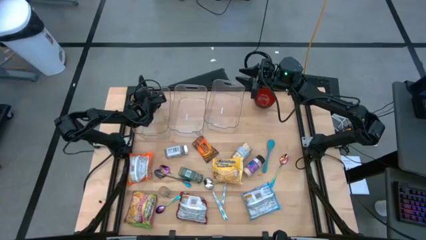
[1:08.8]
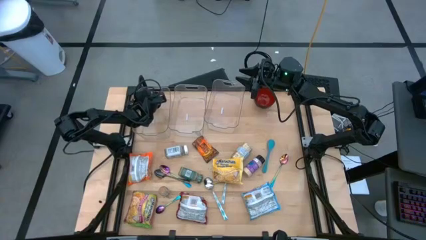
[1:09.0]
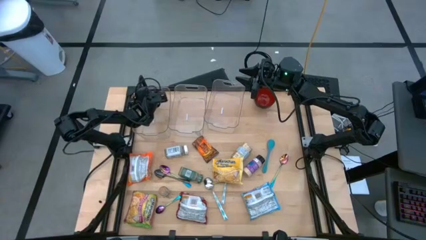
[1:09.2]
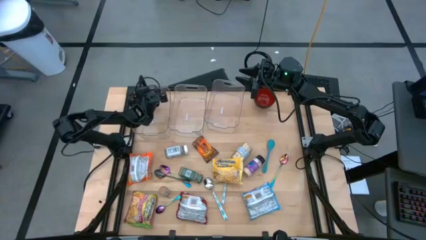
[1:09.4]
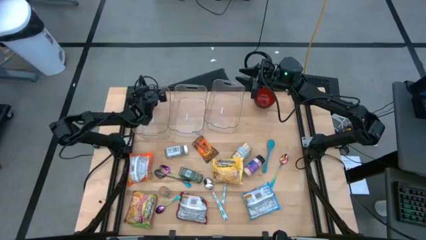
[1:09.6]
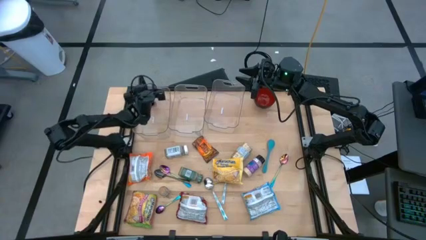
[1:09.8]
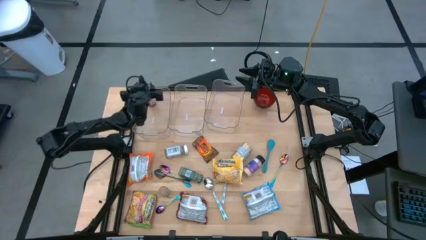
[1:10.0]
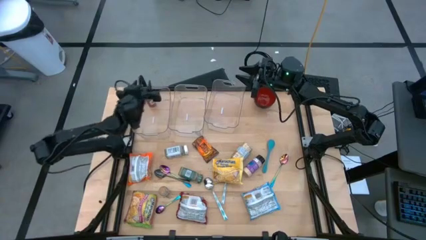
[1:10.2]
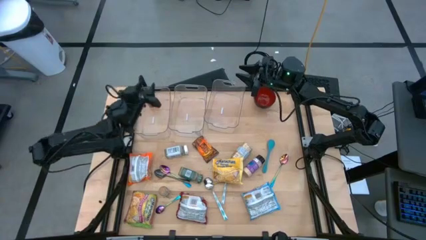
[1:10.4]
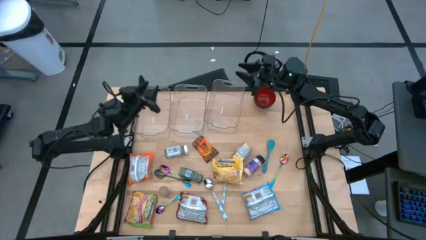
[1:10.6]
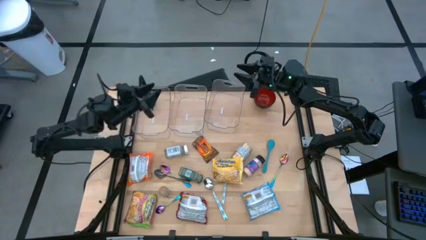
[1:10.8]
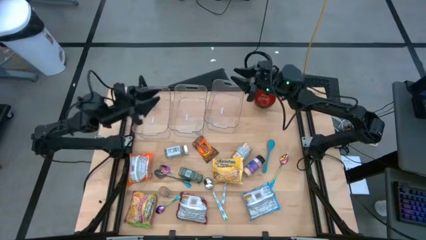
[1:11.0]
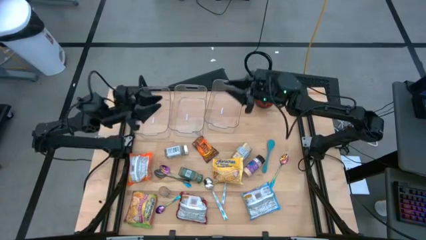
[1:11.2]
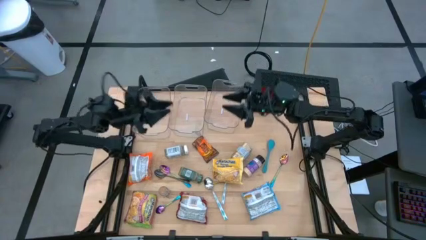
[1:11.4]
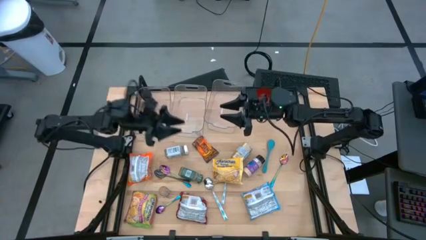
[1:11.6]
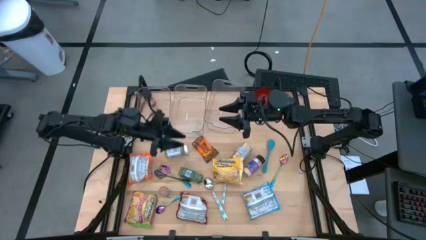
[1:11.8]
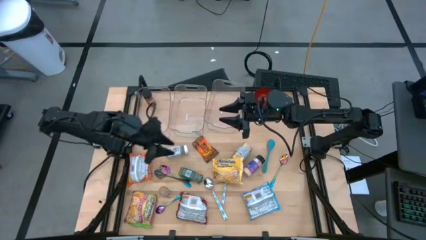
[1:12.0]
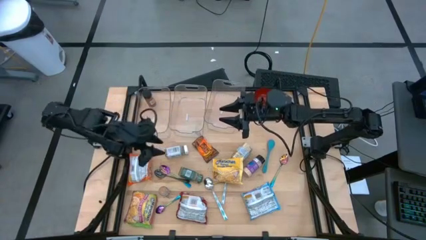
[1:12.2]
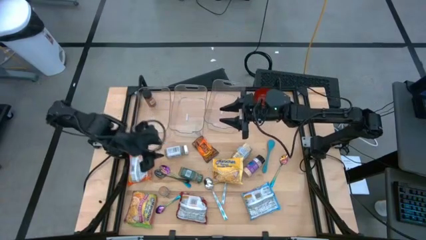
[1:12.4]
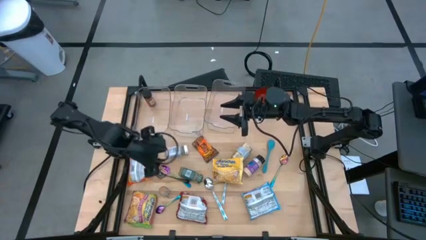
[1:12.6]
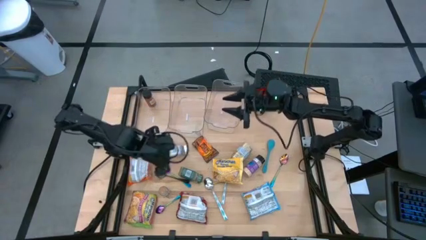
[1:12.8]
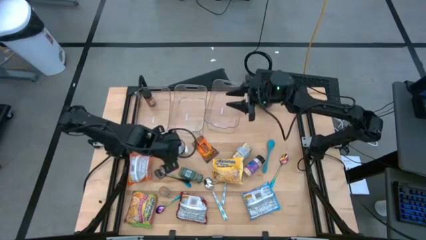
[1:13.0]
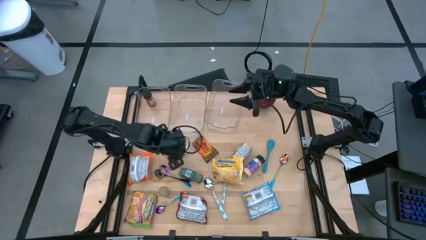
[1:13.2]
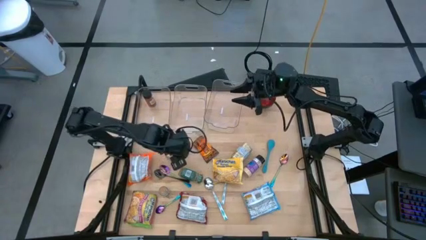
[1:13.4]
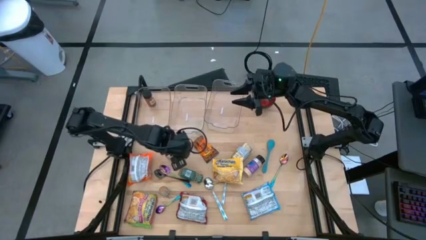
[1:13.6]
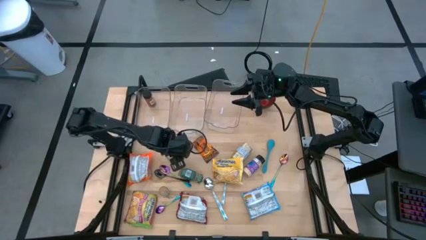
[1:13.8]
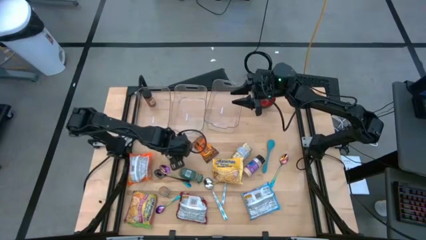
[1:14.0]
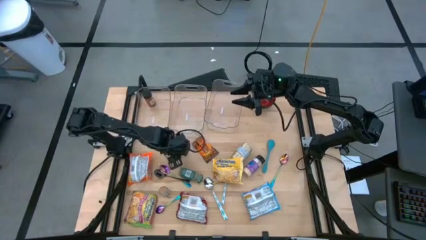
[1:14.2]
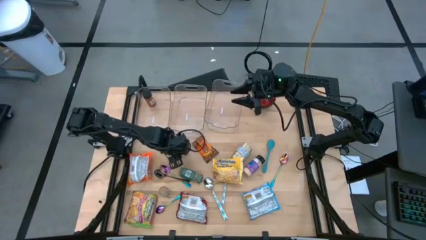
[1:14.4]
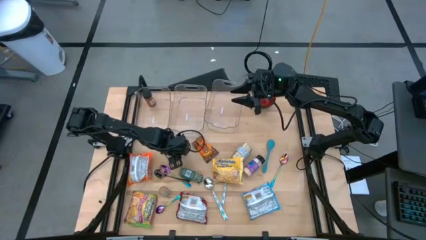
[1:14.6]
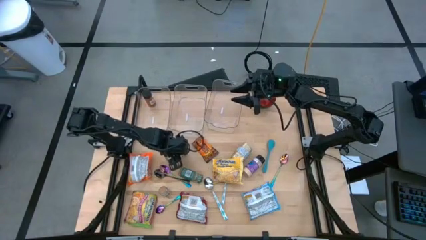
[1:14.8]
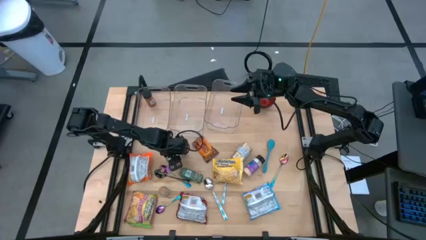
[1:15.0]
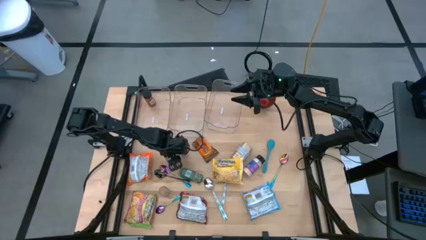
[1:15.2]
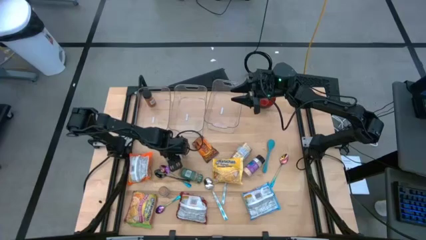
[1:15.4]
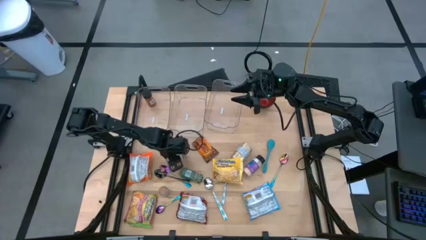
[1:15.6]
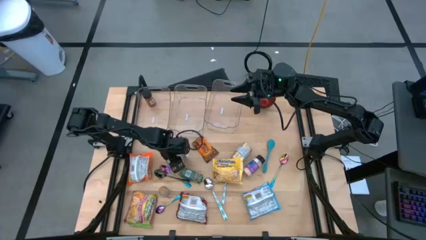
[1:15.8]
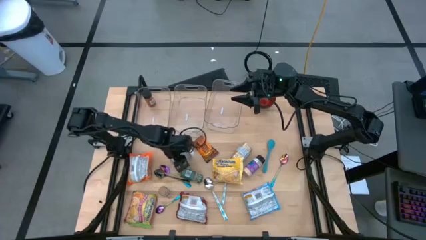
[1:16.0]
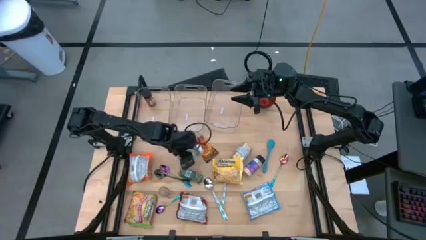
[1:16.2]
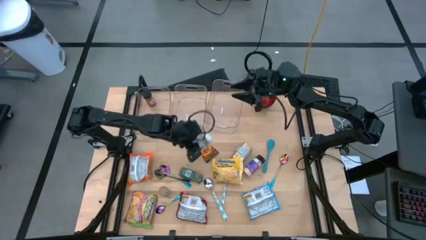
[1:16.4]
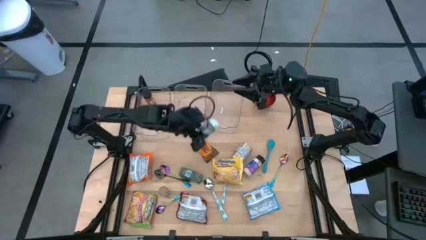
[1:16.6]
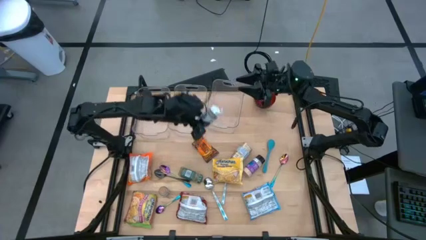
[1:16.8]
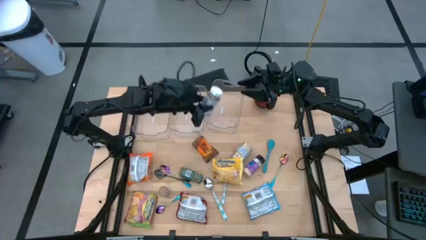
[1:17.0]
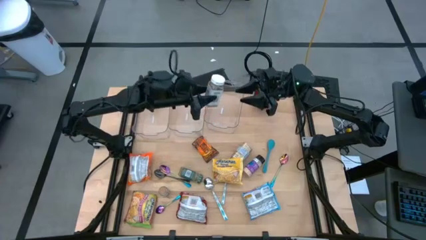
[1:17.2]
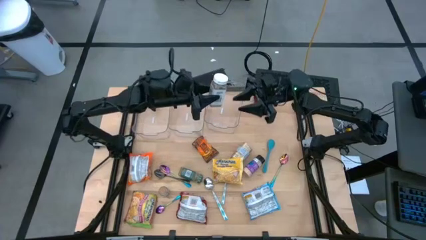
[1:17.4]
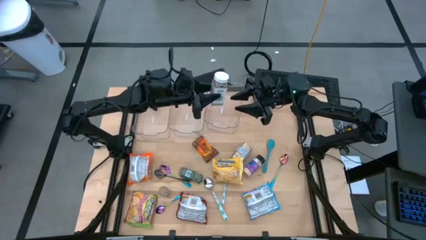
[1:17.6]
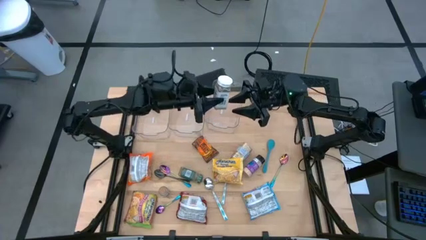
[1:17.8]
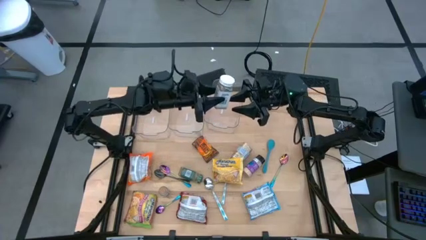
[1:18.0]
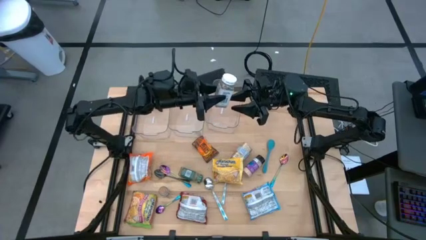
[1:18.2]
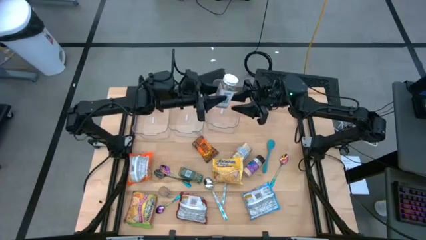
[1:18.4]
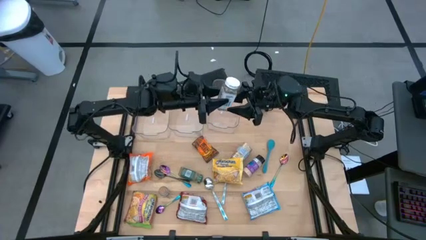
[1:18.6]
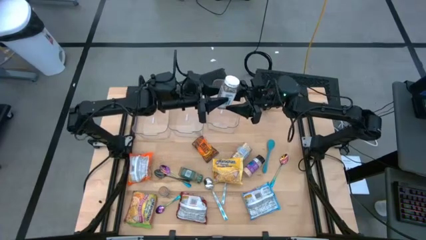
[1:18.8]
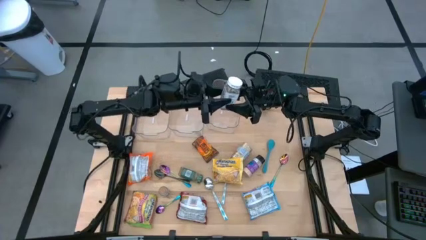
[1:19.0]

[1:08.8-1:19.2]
Task: Pick & Place Food Item
Put the white spice bottle into the left transparent bin

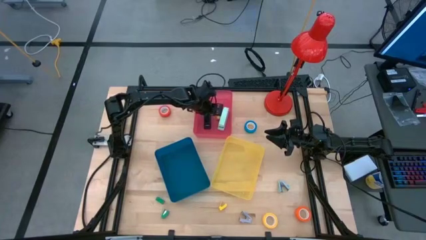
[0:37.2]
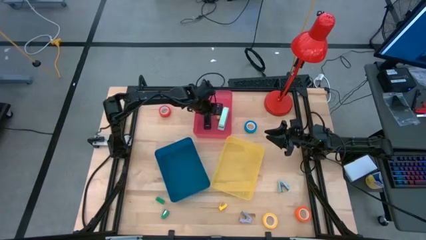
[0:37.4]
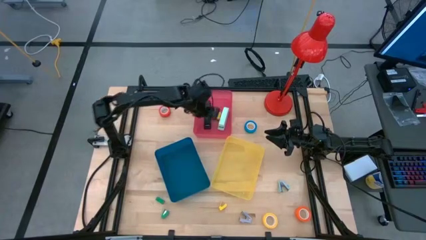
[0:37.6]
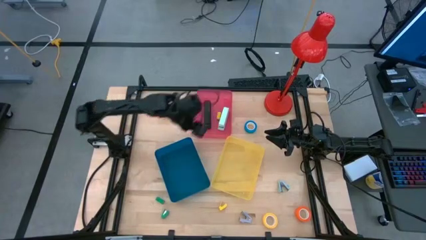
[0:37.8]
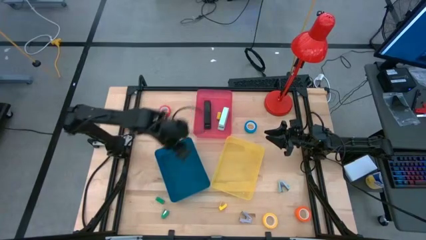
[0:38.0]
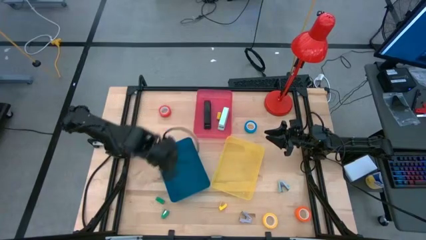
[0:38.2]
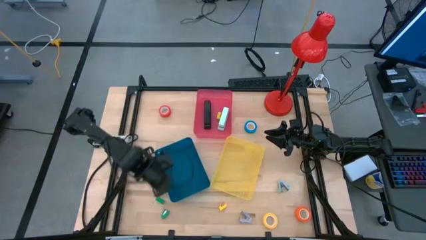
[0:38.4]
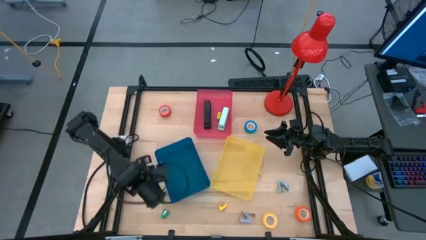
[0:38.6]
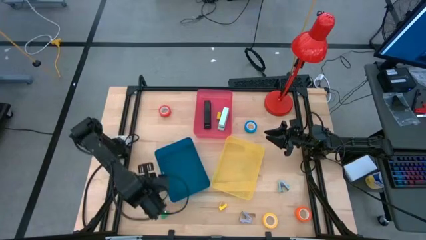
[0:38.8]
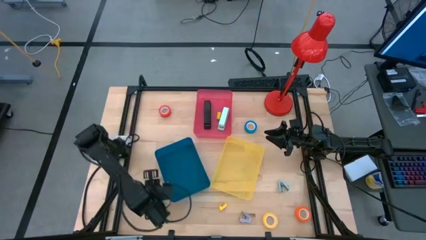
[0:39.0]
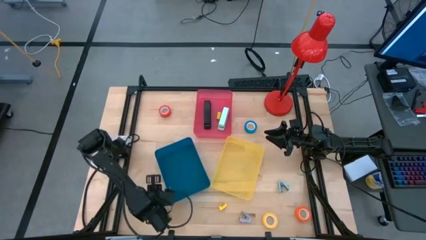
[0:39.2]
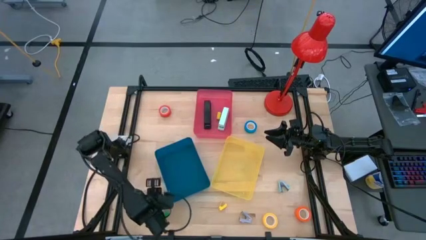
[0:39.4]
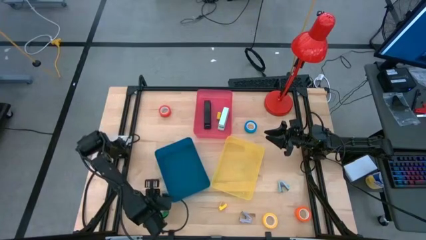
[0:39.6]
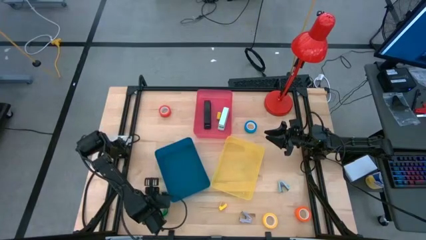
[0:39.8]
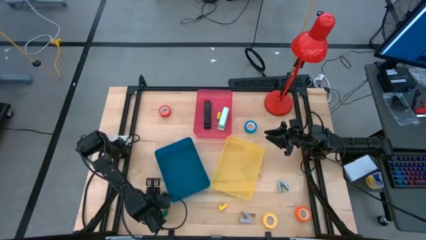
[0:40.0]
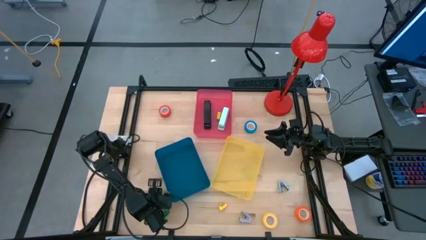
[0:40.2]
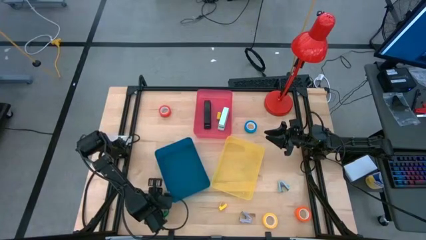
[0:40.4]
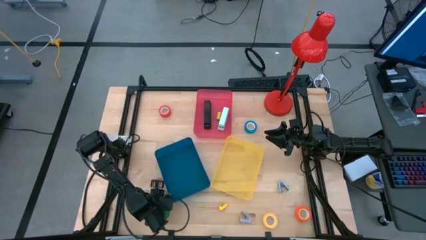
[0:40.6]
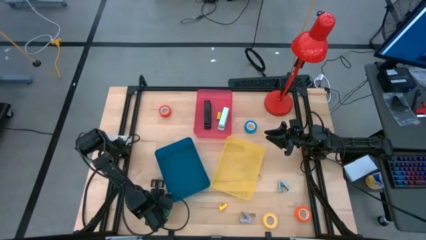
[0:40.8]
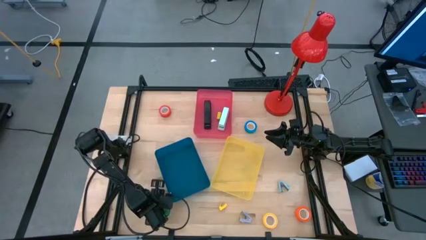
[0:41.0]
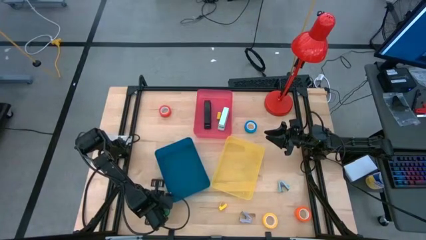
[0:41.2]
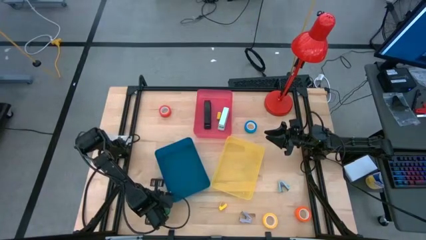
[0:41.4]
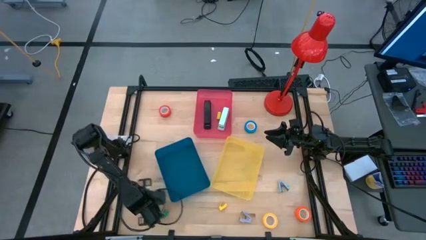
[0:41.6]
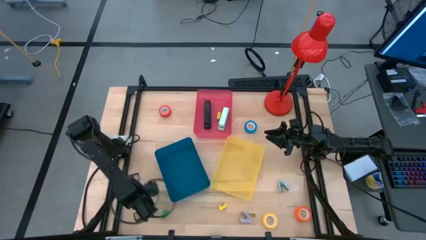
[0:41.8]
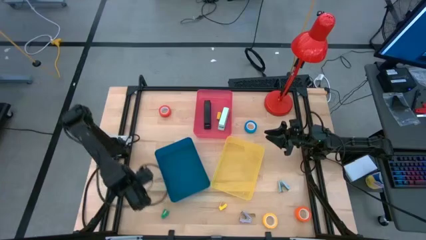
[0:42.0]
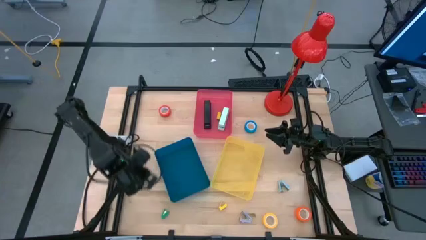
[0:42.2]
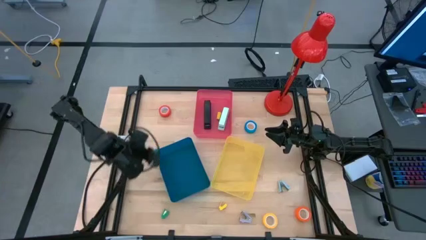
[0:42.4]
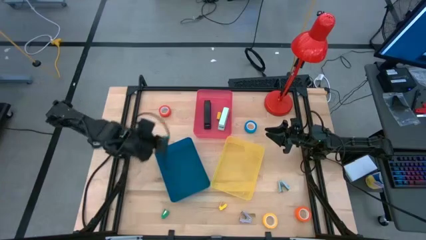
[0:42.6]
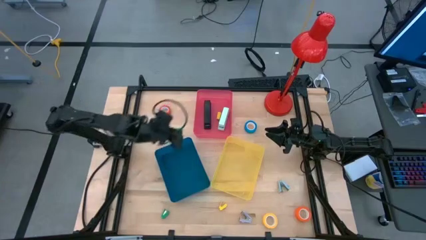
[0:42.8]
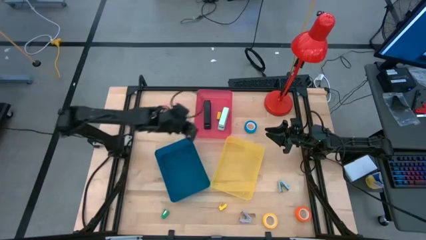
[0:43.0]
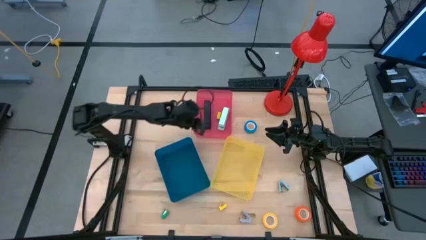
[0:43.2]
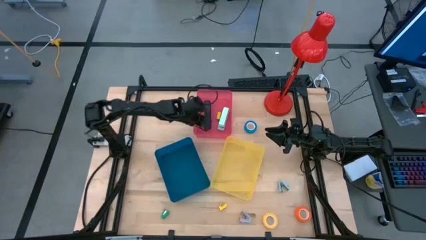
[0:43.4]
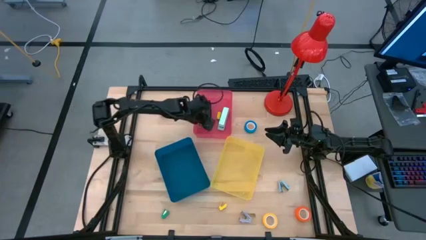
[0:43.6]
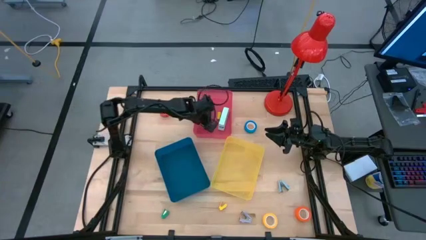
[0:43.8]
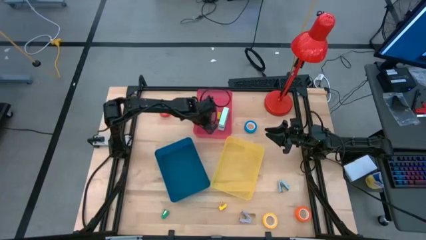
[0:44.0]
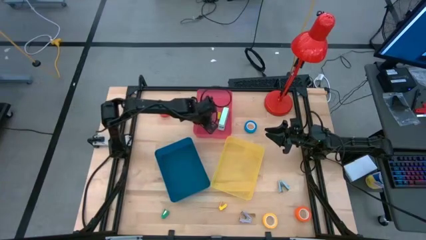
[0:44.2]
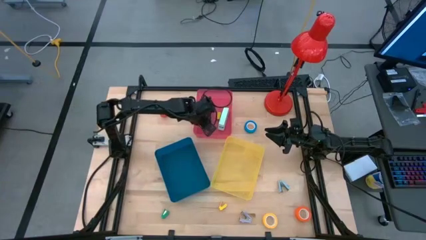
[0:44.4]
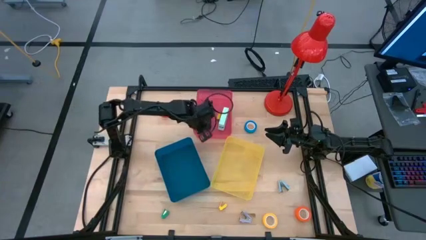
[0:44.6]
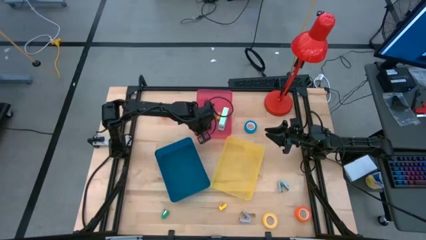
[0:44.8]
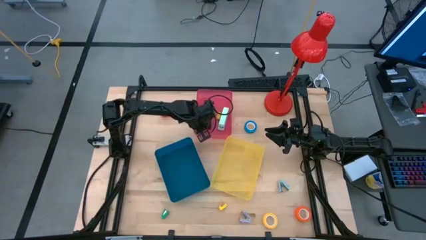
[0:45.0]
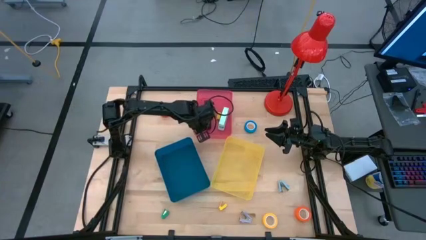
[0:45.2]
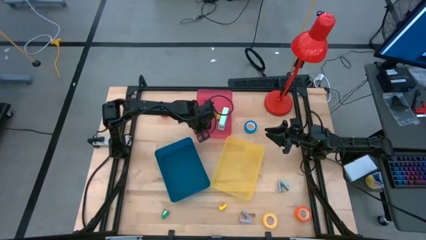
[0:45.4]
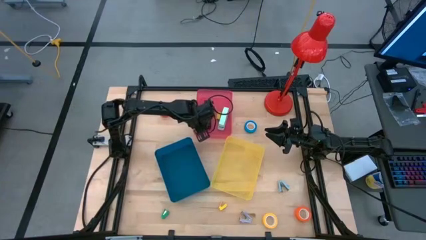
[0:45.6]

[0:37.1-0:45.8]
Task: Pick and place Stapler, Stapler remover, tape
Put the top small green stapler into the red bin
